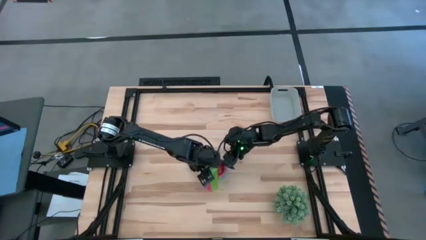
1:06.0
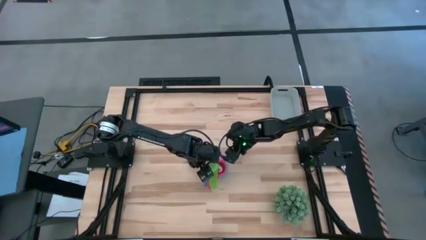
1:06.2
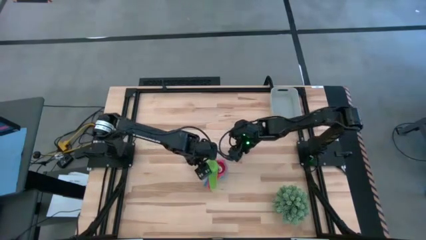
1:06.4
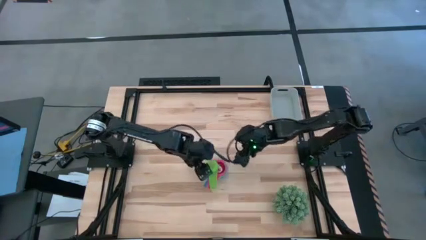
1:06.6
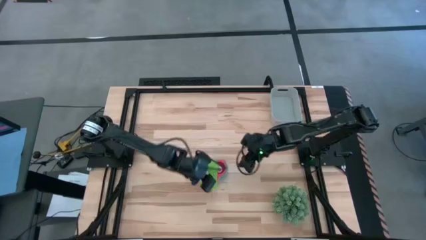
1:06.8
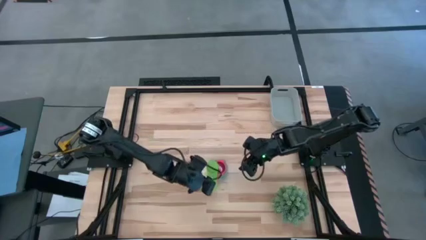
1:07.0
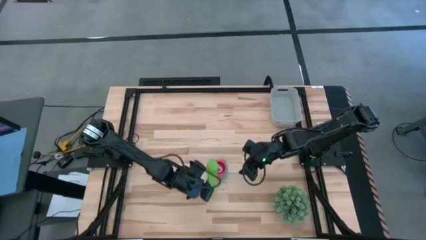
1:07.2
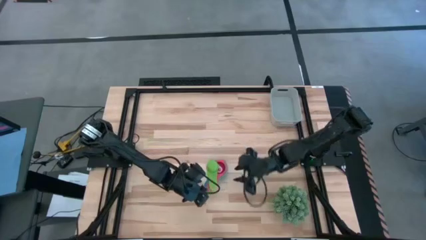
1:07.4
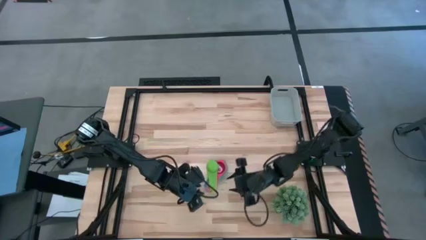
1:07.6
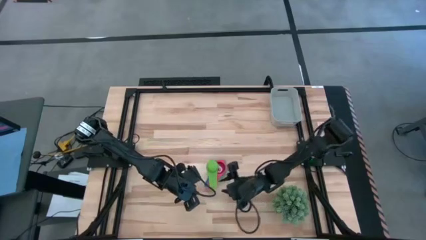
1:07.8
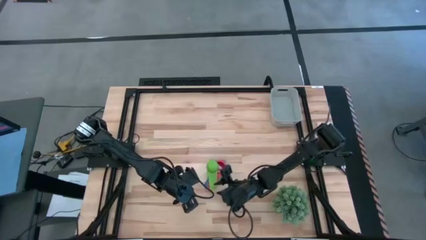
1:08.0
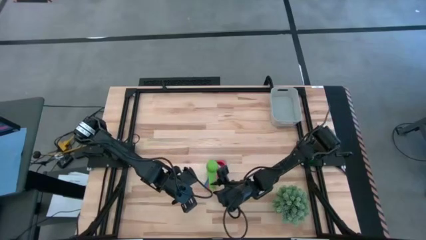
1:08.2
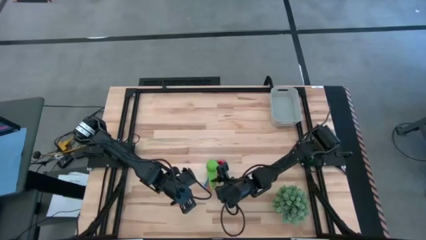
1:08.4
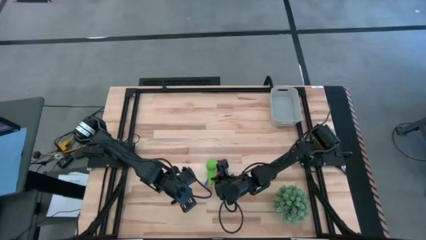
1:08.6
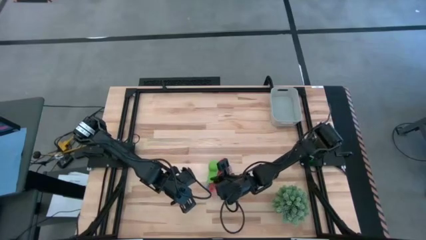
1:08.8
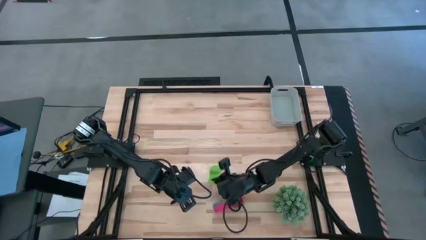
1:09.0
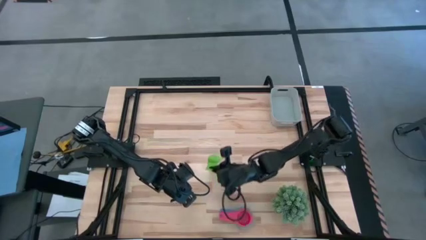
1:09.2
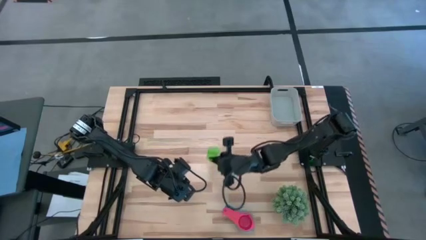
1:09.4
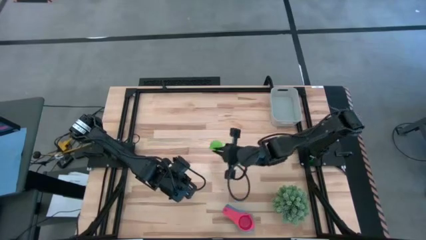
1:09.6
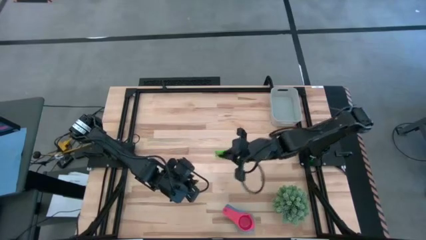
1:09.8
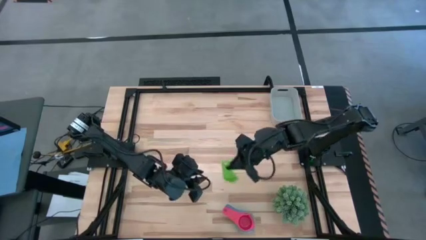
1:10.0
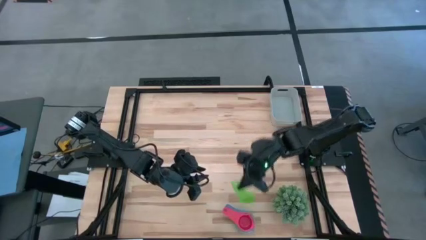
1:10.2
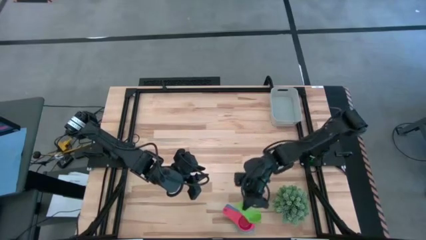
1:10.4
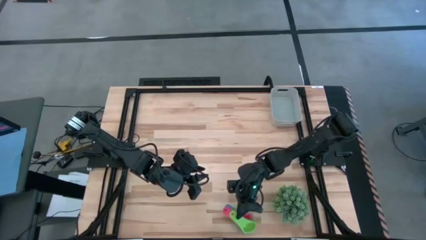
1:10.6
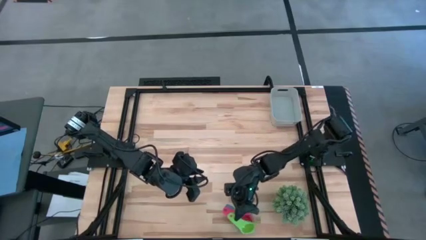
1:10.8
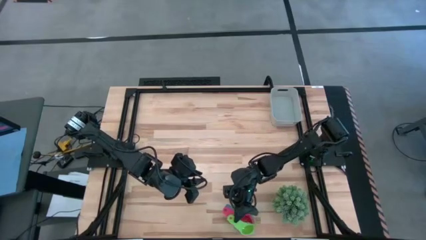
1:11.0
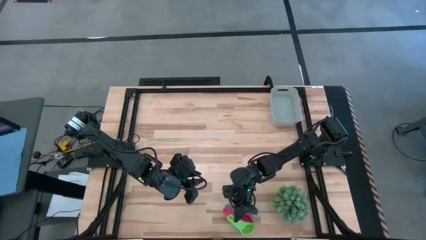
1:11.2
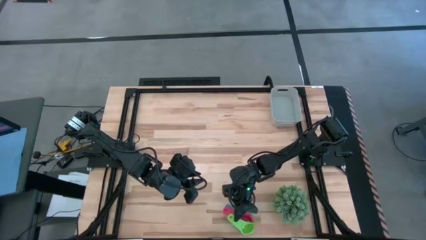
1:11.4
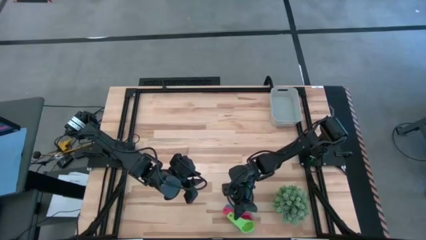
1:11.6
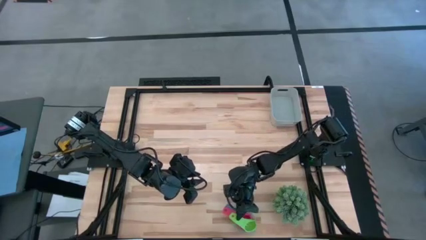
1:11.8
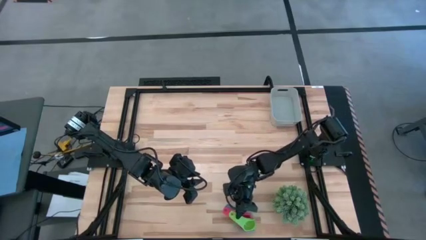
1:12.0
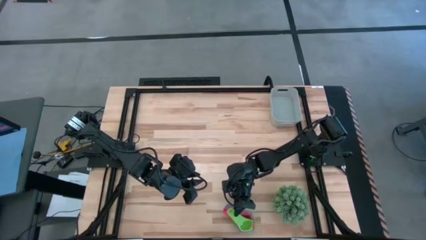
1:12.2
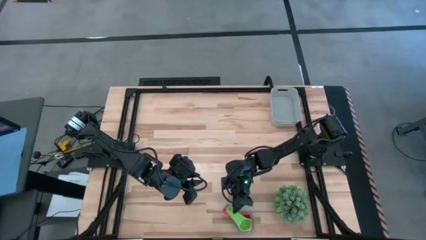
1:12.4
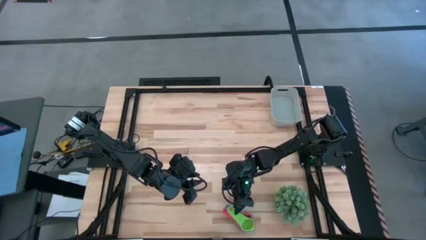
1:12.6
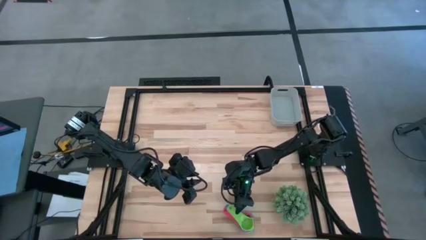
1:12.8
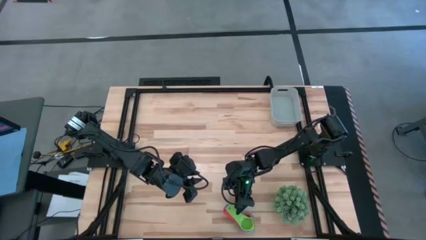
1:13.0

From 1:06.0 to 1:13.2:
Task: Nest measuring cups in basket
Stack the green measuring cup on top of the orange measuring cup

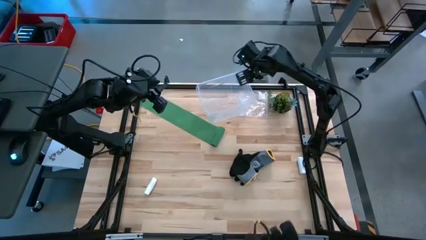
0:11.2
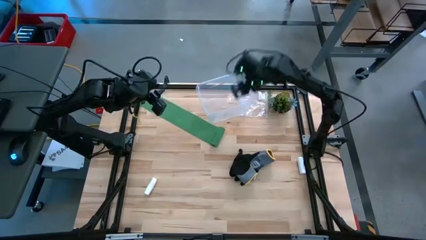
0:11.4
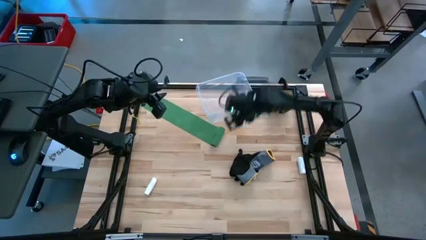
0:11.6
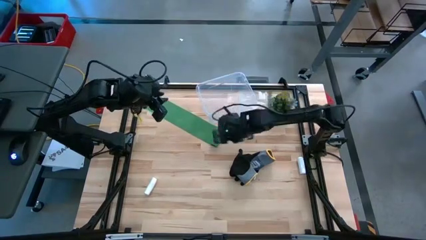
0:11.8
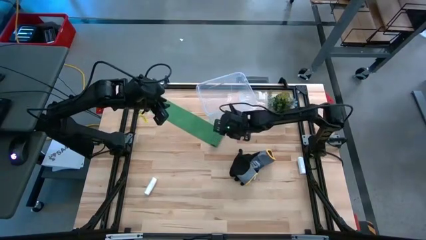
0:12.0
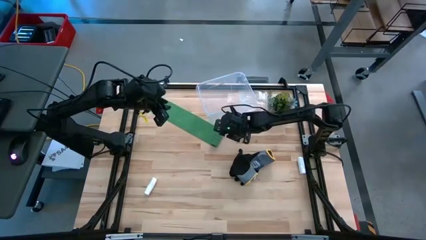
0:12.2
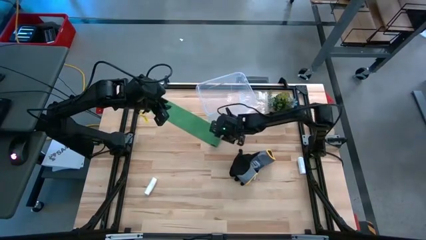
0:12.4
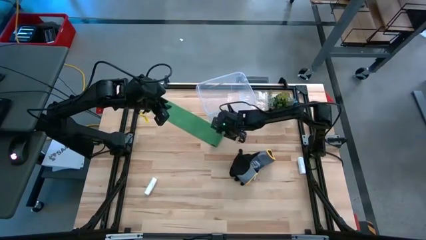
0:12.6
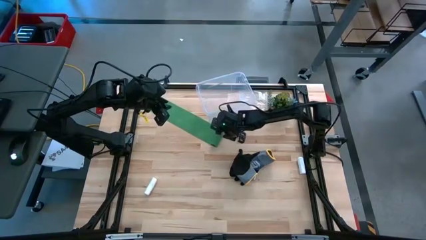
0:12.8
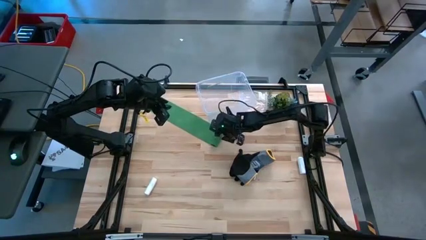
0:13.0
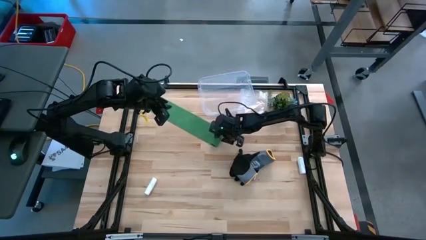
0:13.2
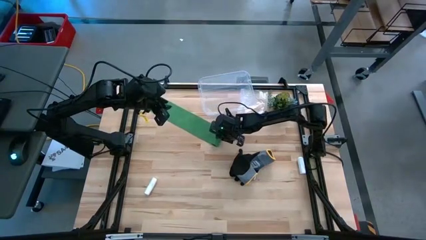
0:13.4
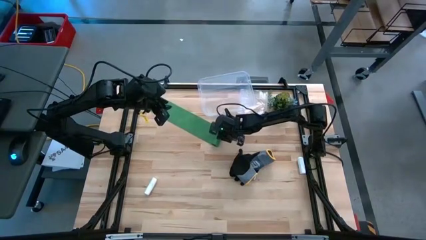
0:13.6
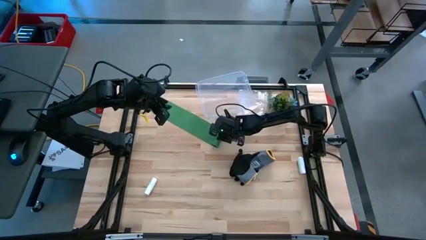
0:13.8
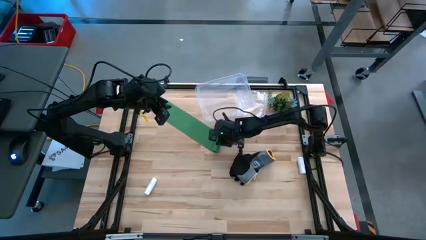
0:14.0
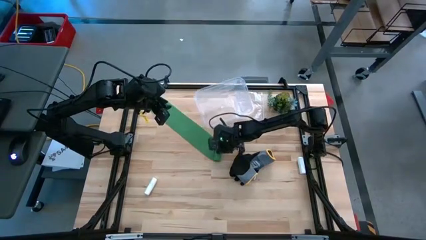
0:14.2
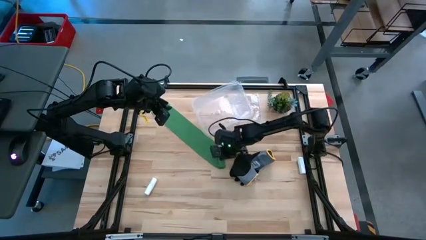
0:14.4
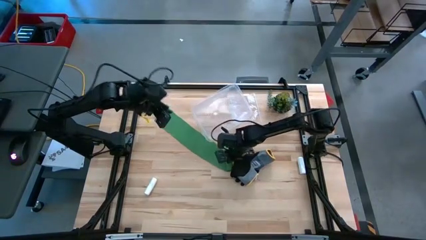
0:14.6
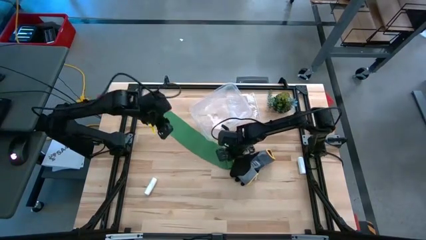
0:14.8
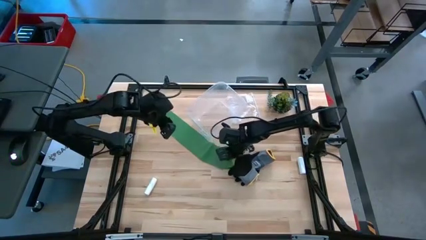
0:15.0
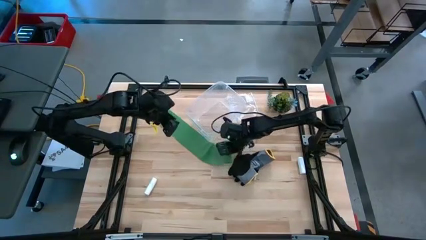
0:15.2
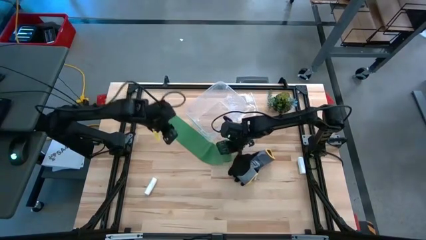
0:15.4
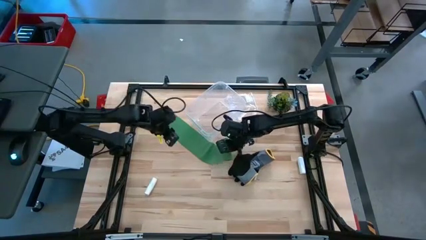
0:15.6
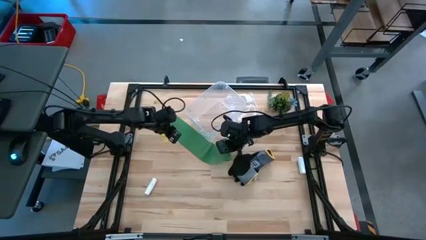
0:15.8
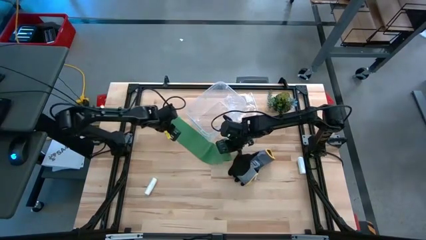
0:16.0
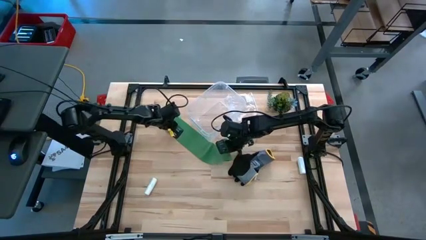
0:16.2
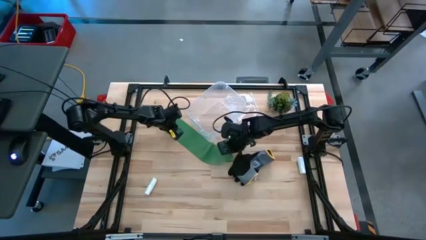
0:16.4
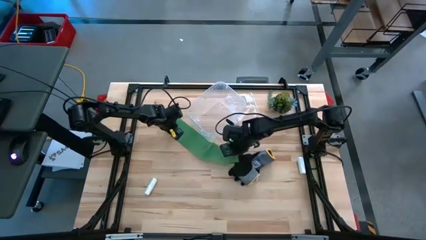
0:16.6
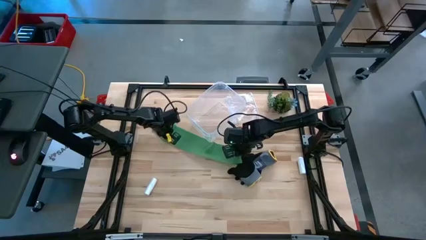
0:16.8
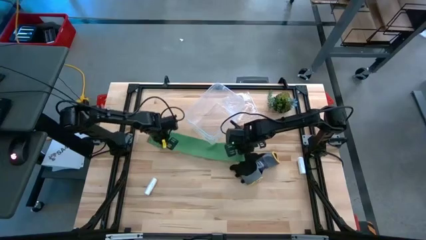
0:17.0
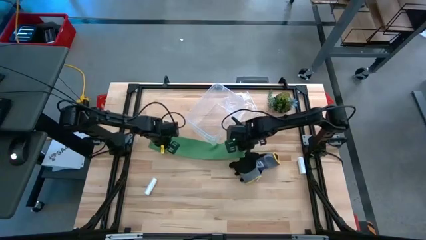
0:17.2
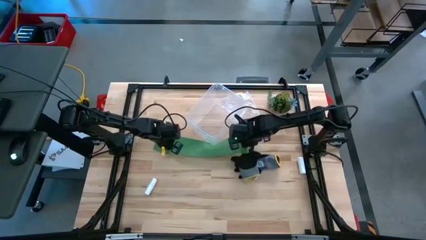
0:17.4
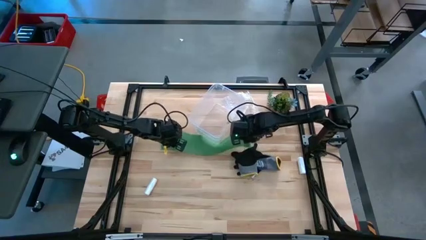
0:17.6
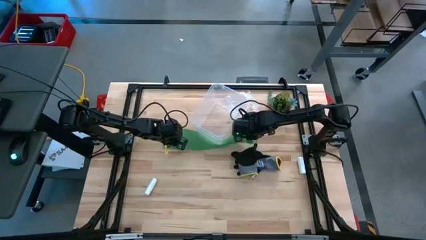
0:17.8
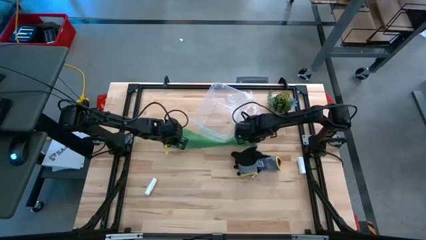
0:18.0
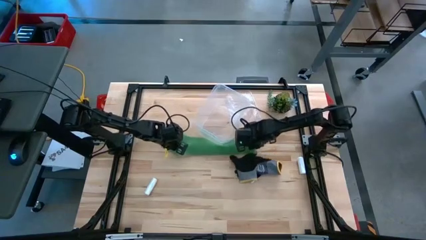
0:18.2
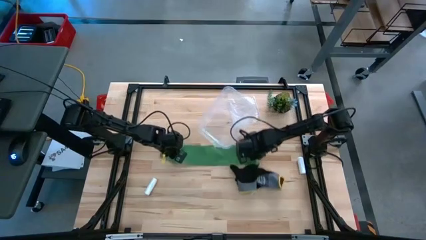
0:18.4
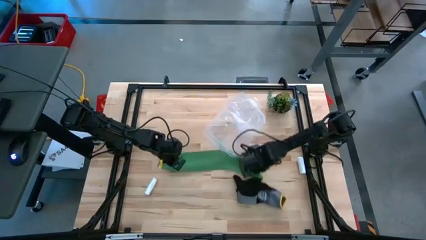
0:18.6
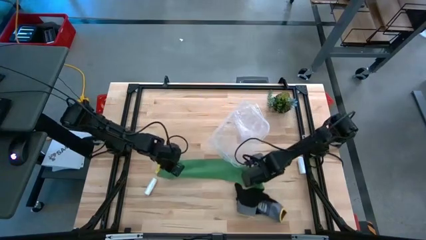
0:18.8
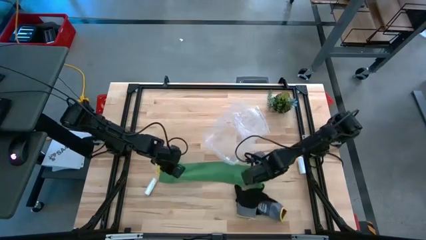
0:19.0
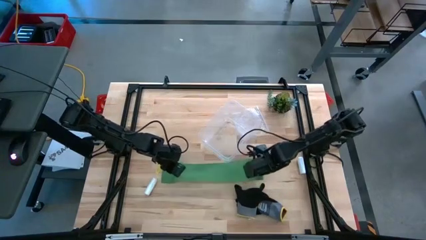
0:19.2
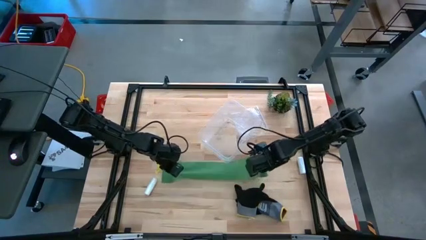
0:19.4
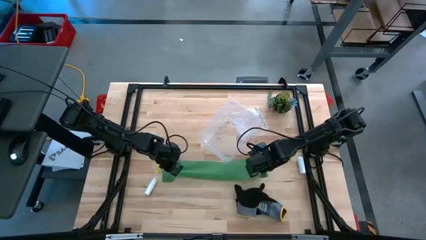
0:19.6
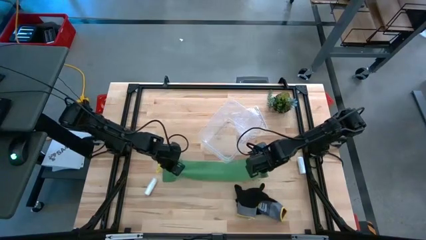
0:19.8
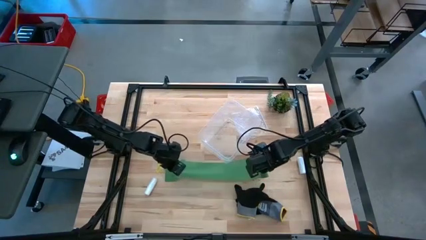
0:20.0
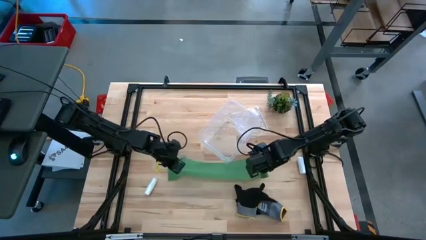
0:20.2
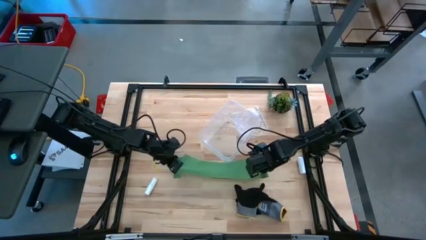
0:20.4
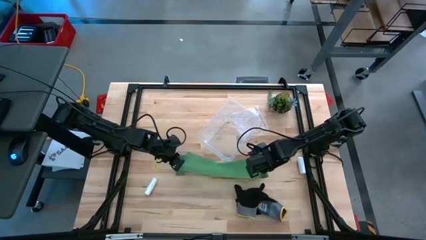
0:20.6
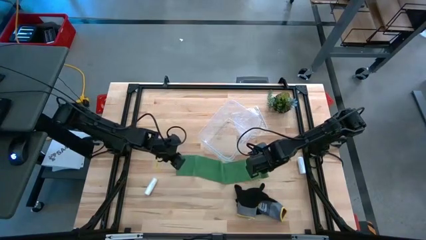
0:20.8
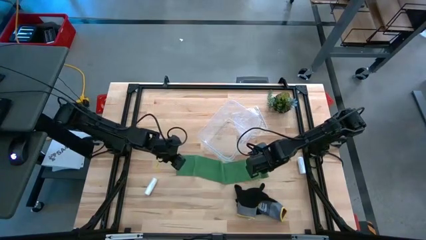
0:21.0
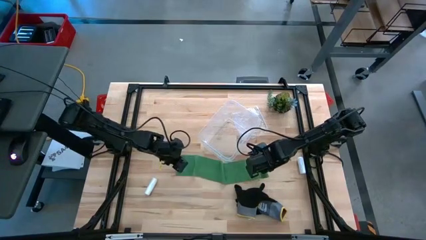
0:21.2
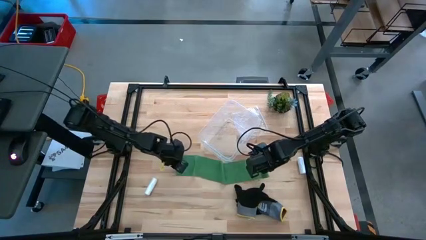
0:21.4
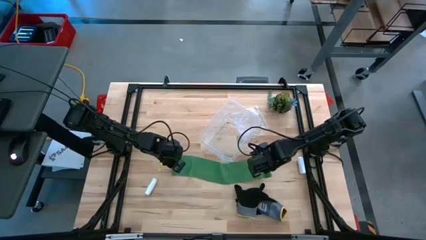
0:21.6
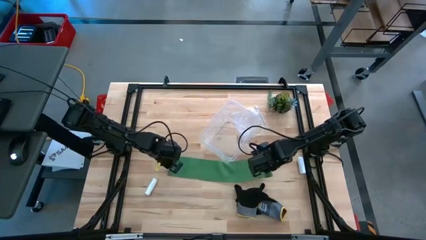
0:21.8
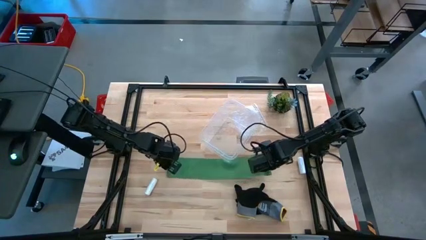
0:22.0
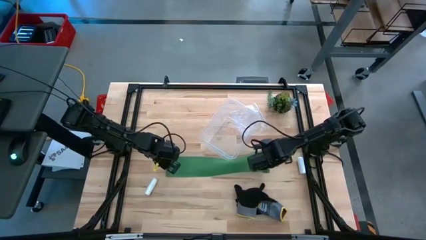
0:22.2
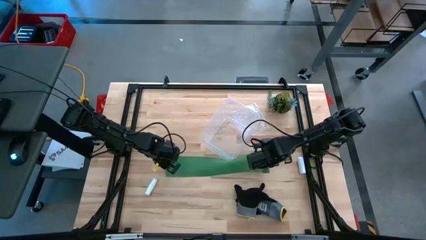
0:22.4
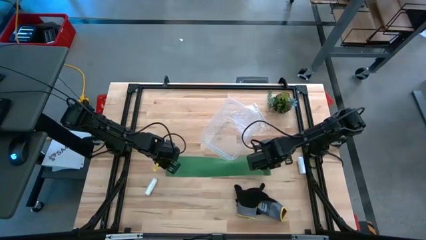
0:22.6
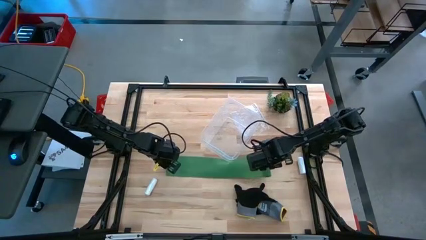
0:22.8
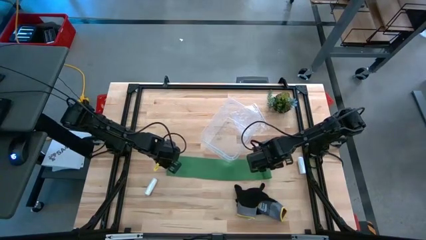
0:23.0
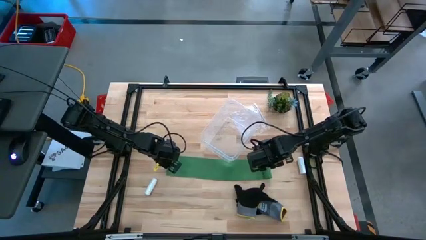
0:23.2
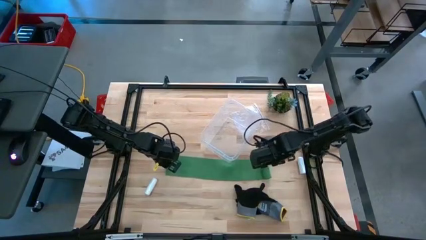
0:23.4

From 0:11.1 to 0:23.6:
Task: Roll bandage
Move the green bandage to the center of the table
